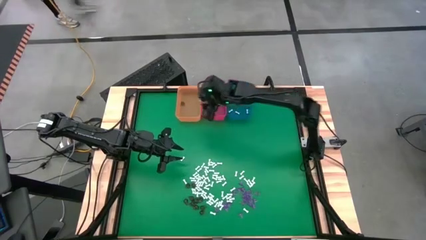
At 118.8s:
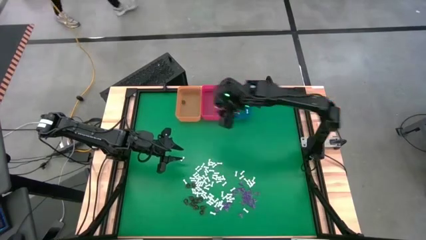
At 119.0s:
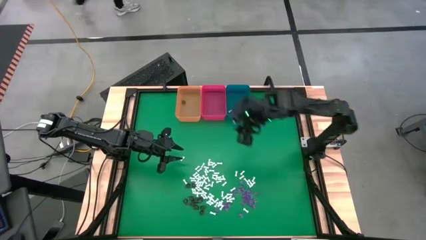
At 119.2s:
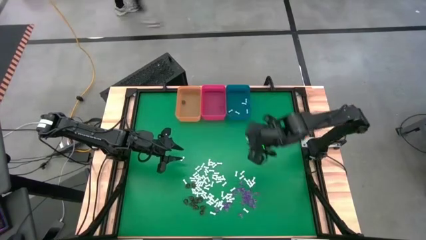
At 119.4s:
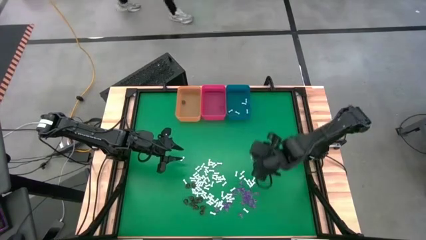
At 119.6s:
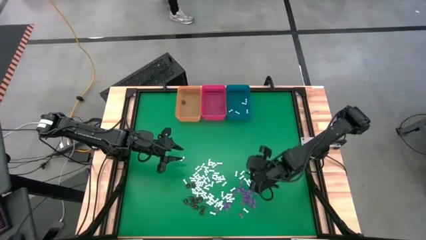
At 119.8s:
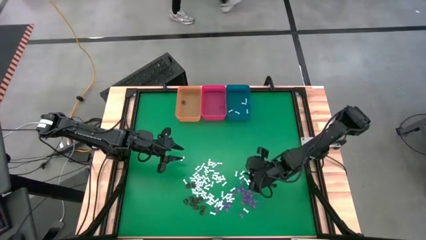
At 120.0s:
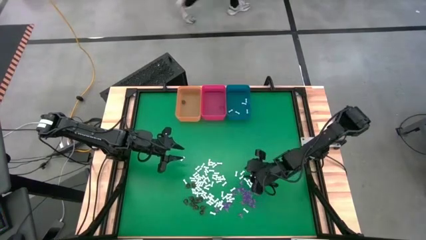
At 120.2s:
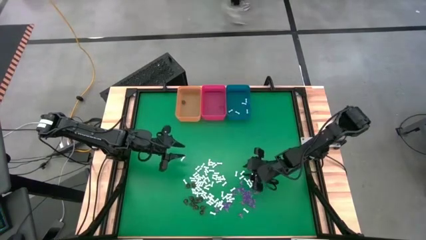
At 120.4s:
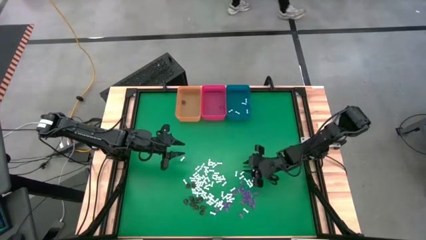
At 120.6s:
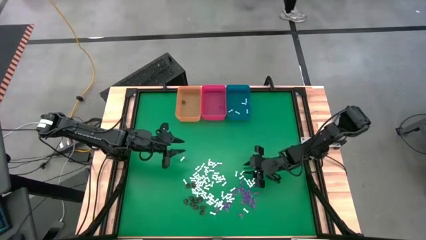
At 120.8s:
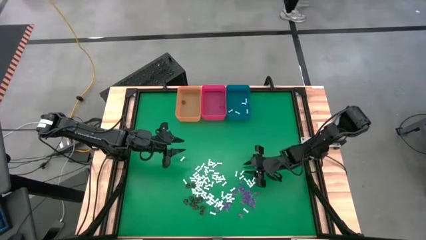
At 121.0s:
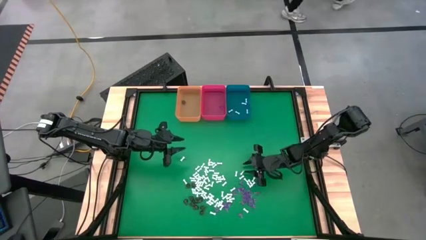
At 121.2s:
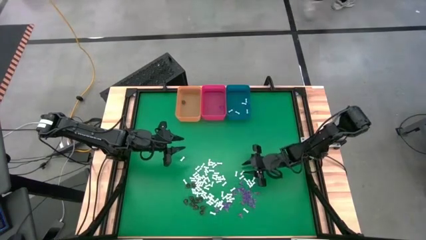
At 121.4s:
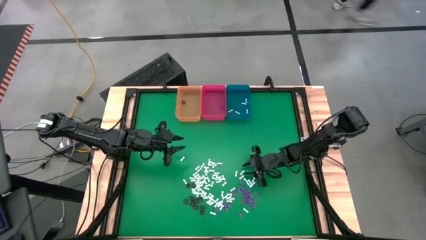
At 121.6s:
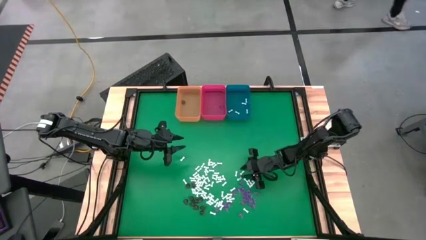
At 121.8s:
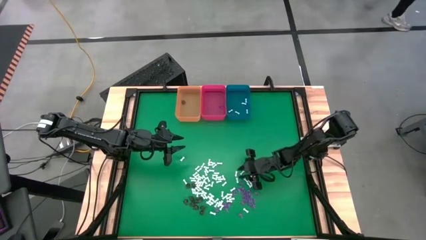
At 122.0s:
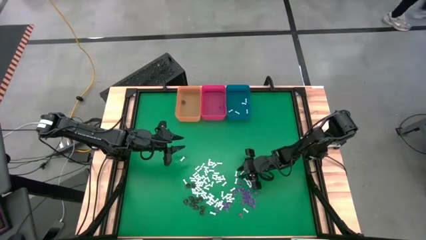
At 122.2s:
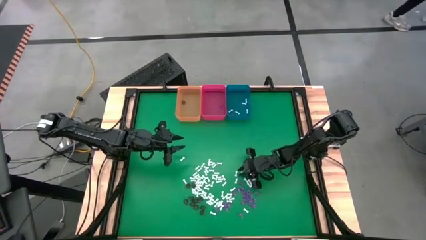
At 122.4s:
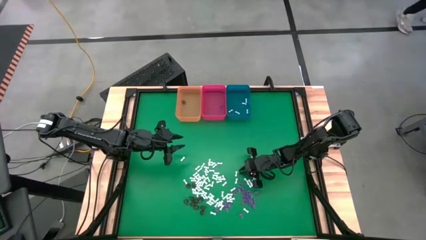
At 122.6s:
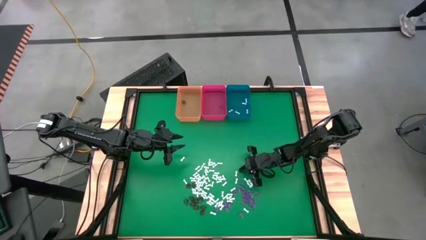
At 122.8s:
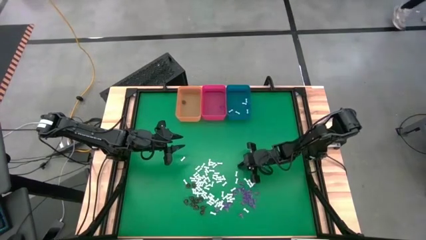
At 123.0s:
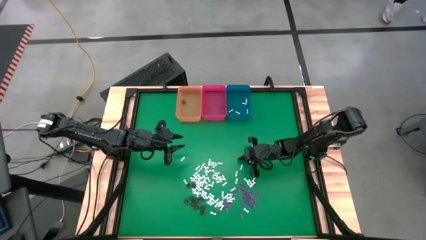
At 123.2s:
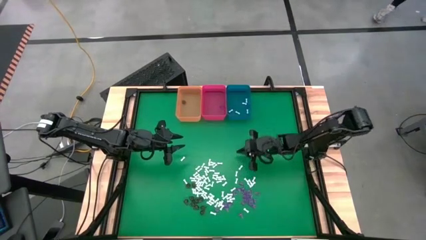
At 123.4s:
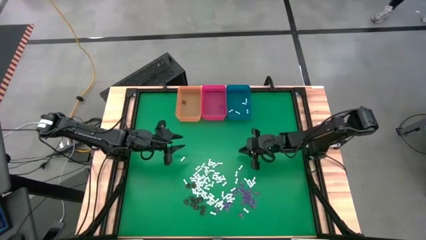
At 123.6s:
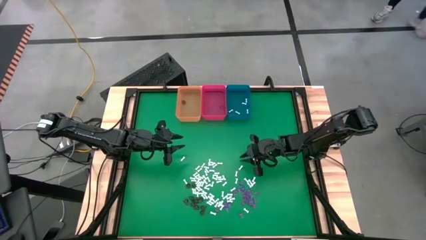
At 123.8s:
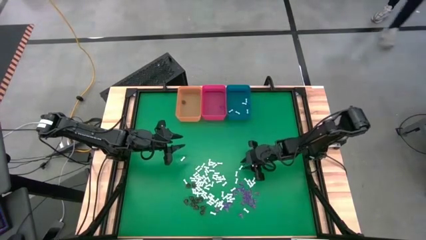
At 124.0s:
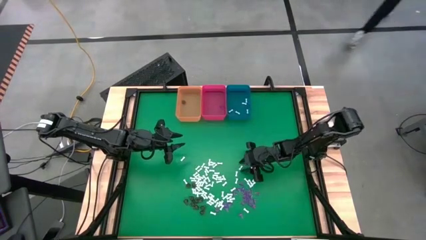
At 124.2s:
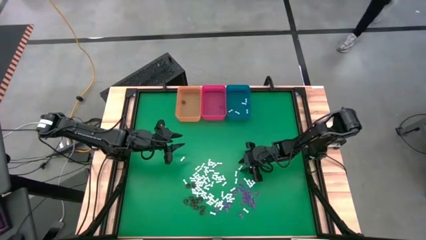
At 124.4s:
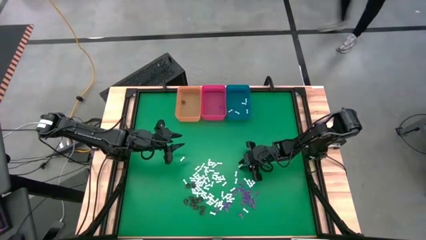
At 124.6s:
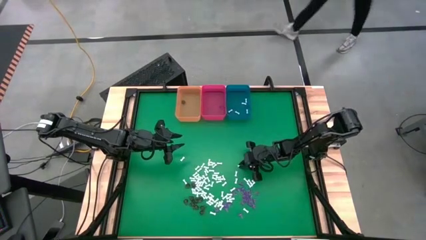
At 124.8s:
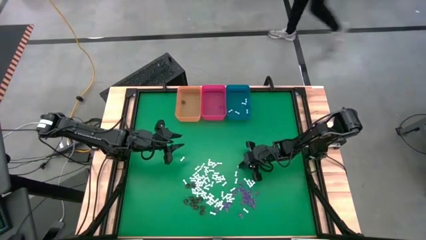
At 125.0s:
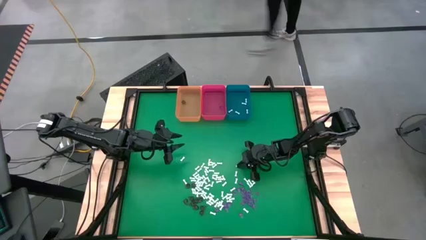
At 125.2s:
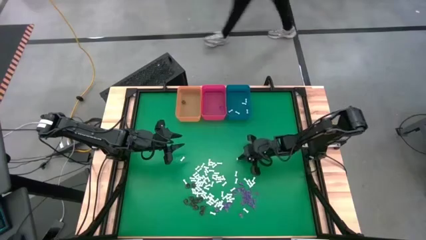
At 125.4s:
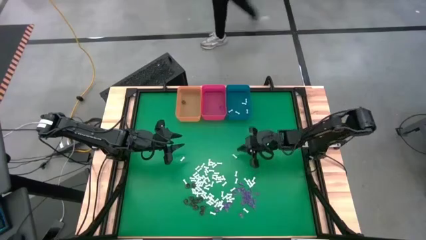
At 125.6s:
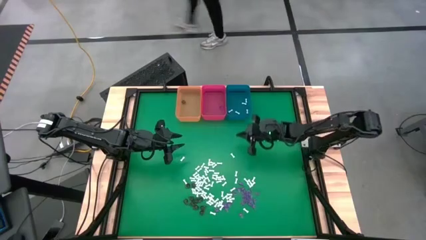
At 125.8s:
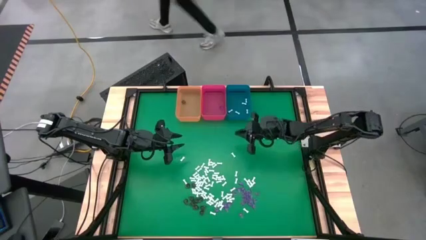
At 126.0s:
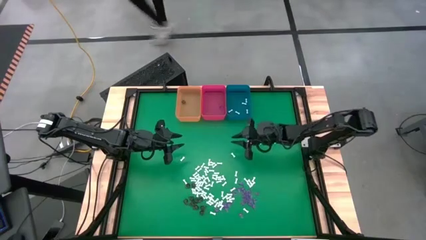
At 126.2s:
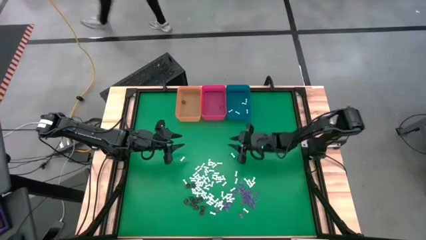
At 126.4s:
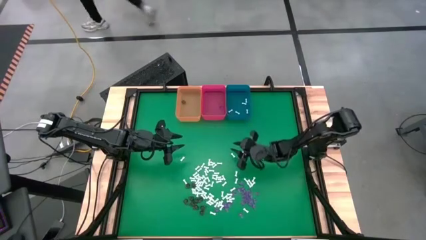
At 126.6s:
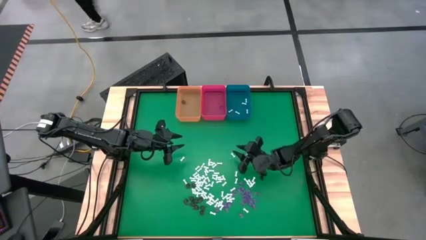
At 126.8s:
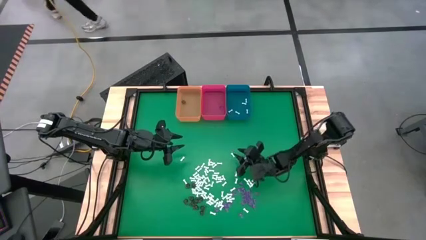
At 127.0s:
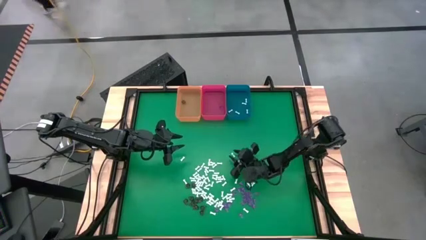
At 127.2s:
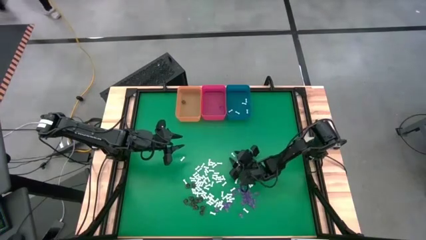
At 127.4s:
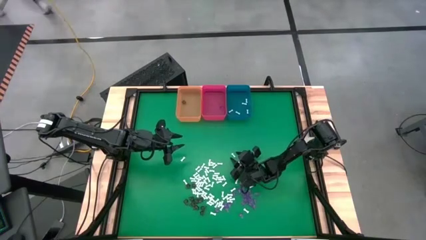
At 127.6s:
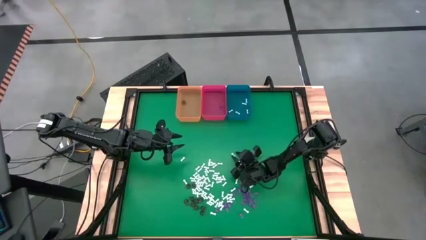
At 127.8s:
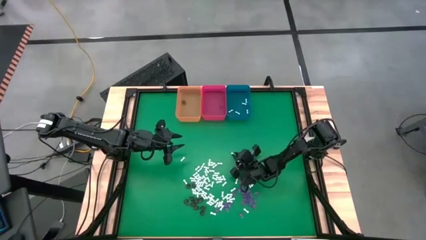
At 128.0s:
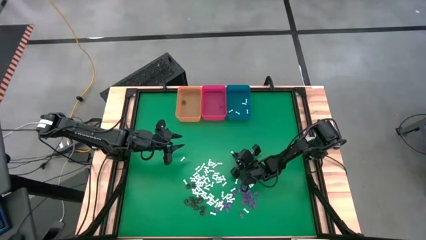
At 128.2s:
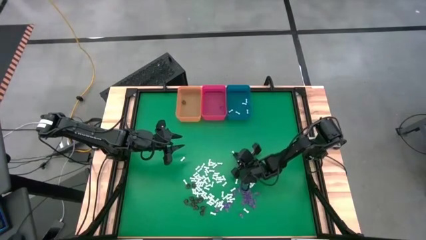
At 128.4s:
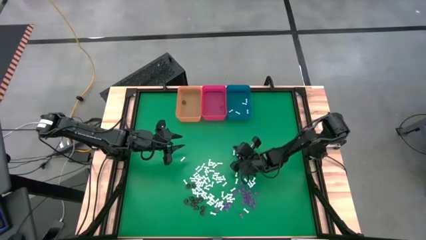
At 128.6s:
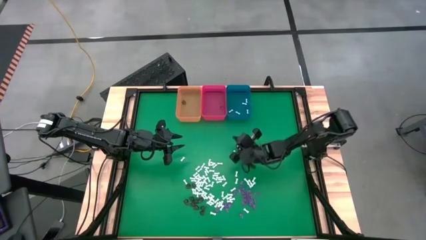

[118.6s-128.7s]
Task: Sort Halloween decoration
Put the white bone toy into the blue bin

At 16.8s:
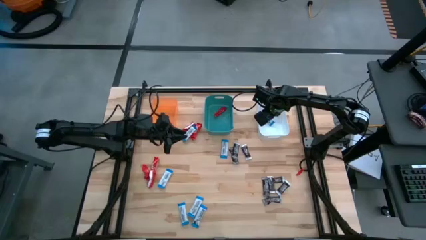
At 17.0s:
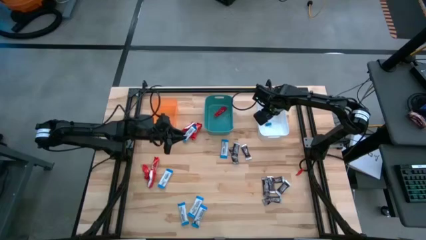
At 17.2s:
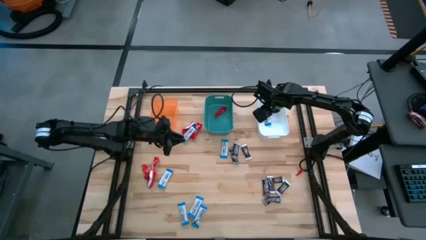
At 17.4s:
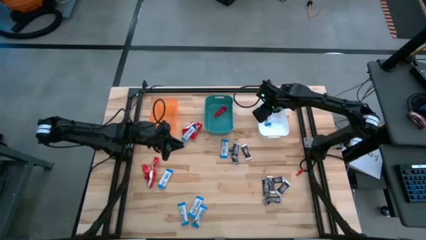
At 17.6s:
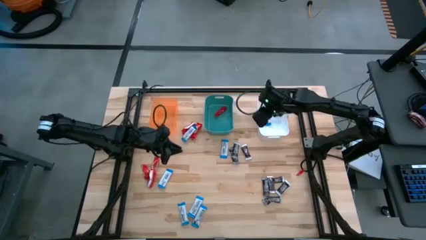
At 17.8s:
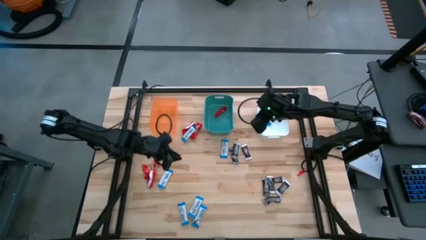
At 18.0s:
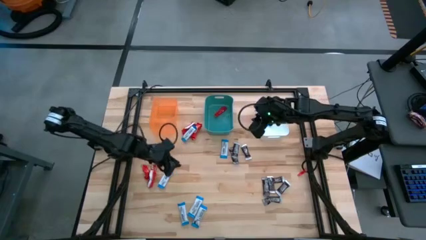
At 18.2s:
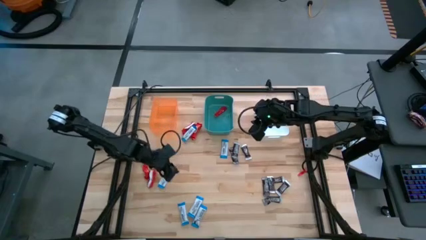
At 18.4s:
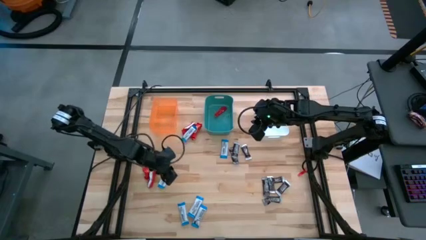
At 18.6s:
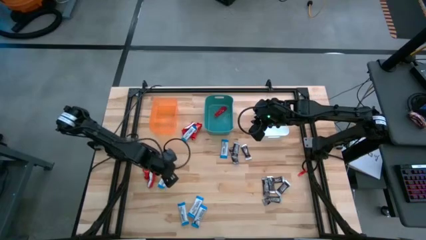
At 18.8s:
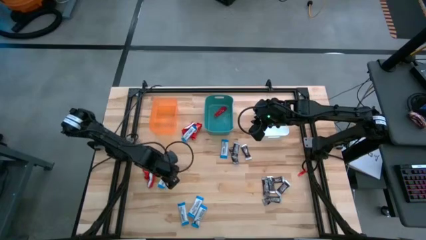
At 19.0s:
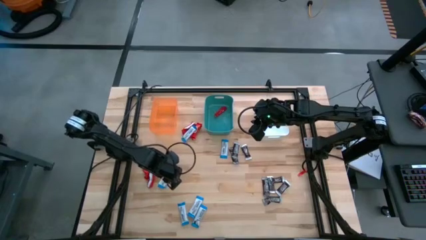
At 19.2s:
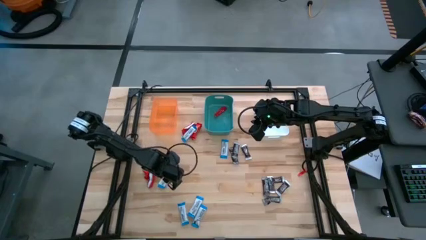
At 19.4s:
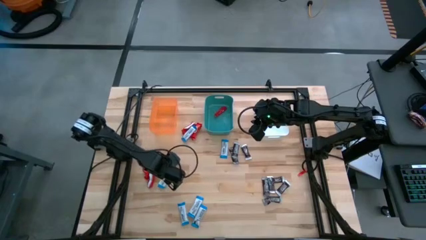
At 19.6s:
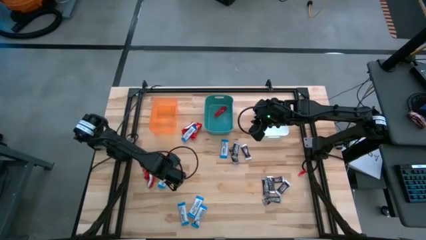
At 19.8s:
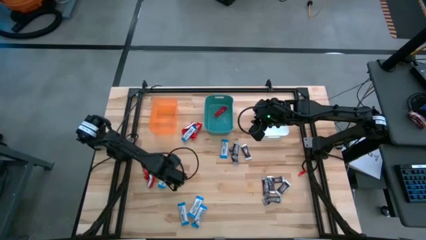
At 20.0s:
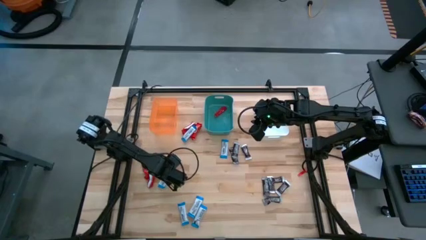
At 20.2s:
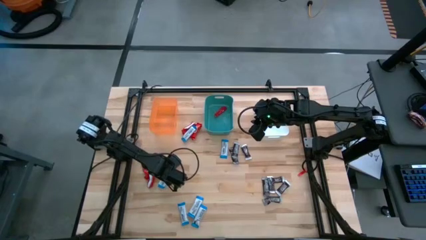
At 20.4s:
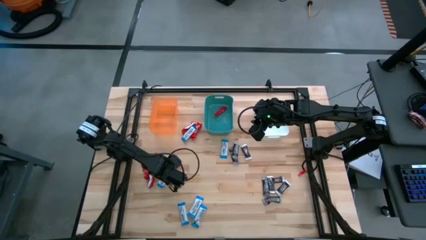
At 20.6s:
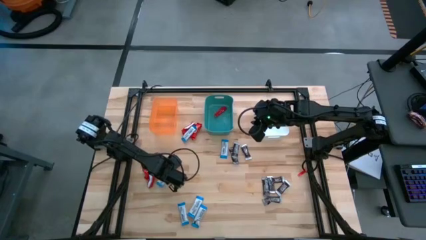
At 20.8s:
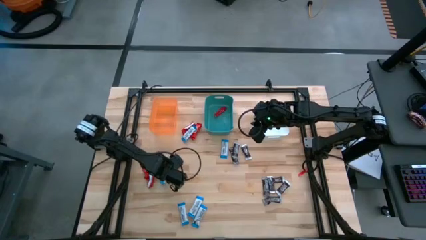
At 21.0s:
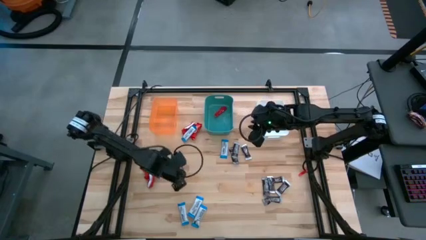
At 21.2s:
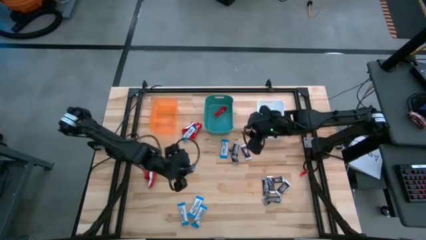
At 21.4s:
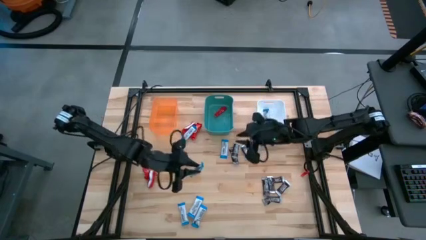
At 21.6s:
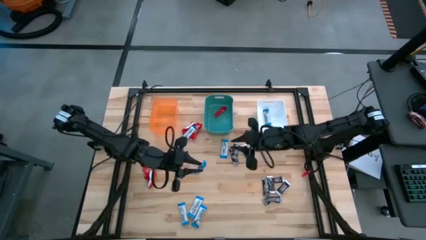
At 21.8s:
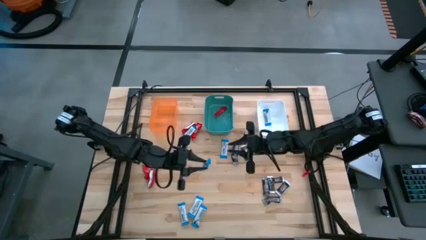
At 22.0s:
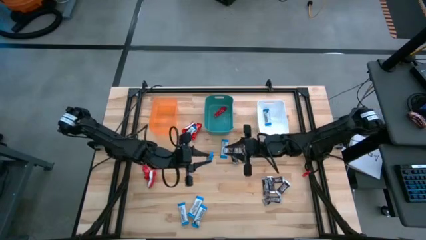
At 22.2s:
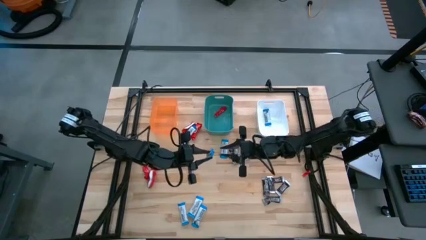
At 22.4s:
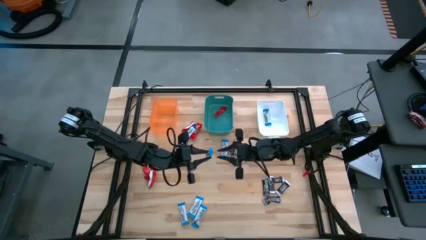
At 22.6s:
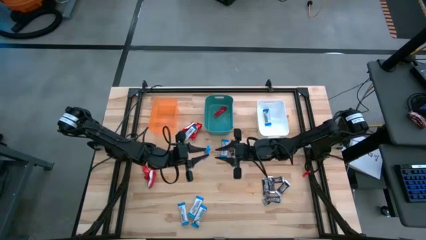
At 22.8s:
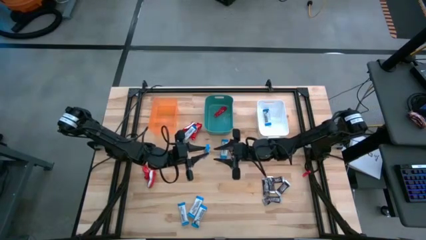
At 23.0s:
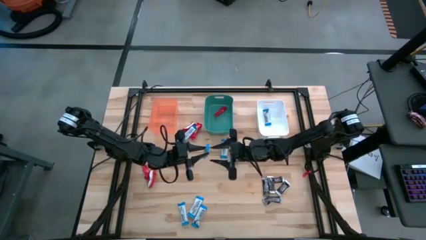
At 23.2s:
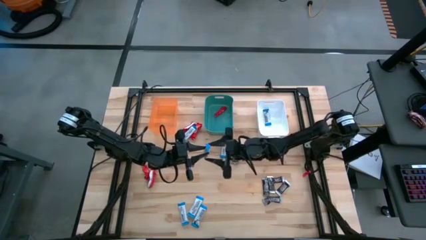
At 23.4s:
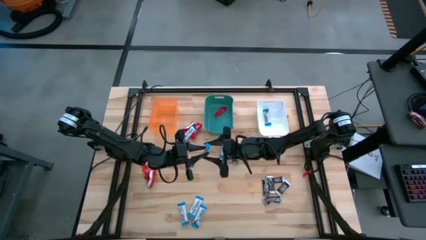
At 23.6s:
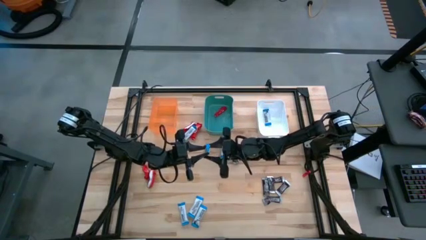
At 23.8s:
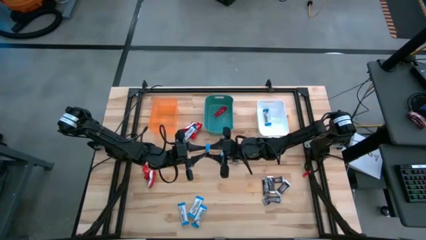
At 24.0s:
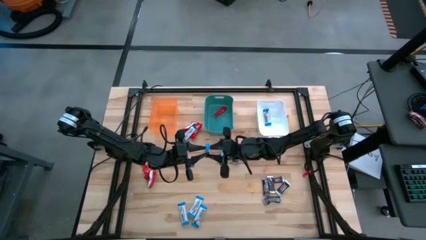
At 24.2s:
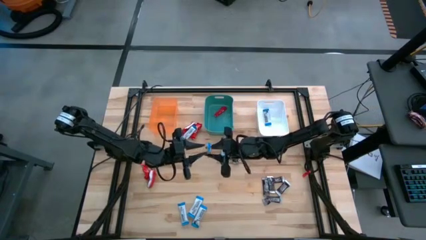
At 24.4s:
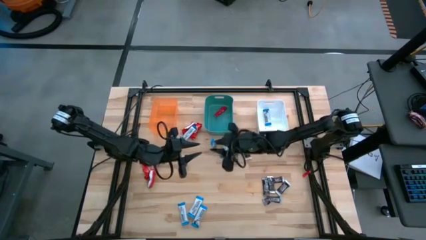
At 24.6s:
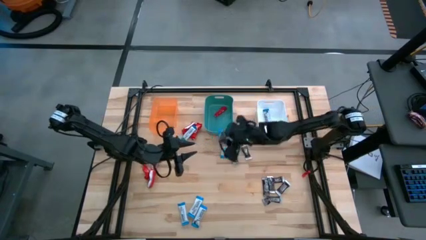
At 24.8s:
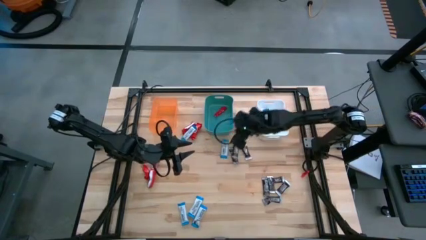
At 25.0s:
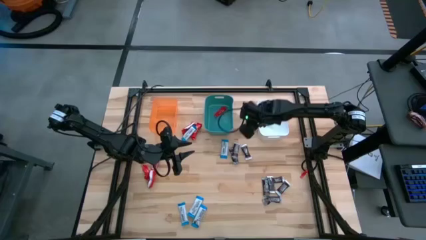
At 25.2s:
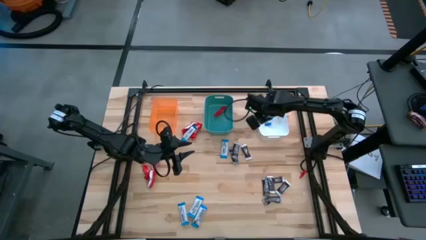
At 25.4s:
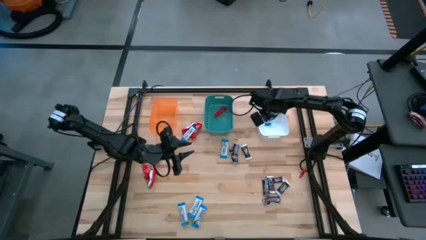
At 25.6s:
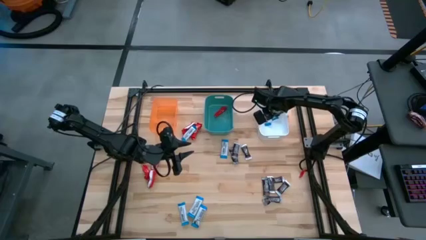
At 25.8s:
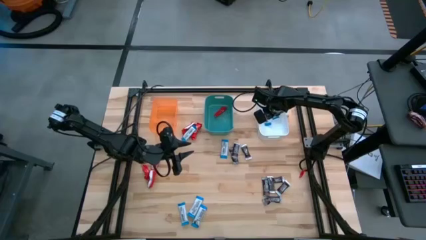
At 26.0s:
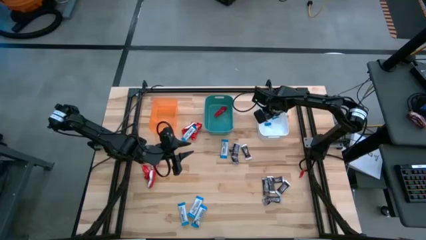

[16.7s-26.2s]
Task: Organize candy in baskets
Put the white chocolate bar into the white bin
